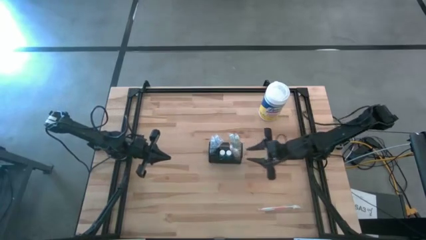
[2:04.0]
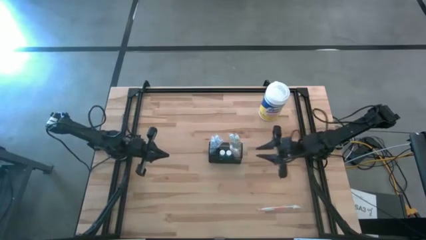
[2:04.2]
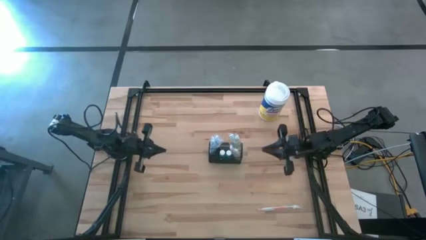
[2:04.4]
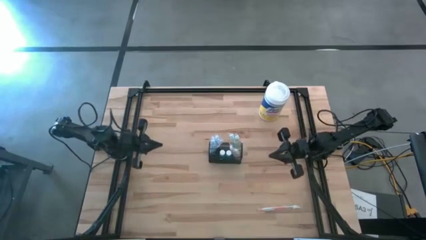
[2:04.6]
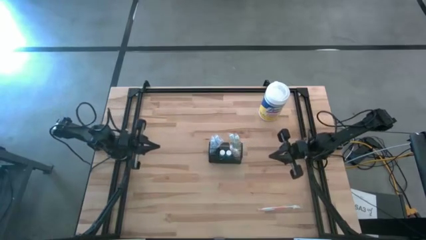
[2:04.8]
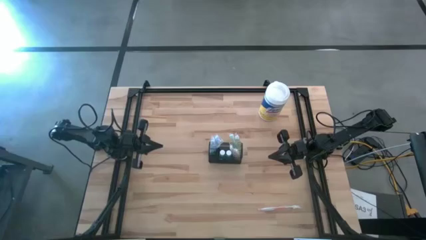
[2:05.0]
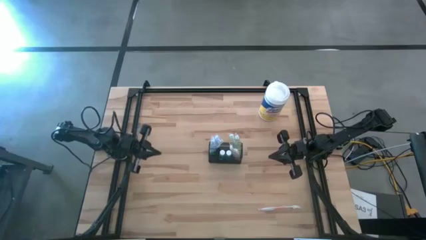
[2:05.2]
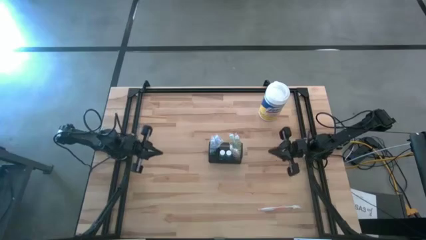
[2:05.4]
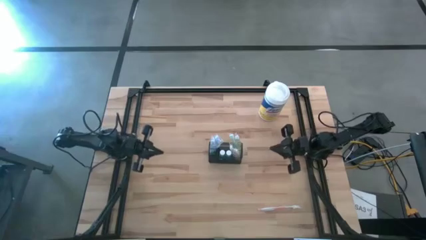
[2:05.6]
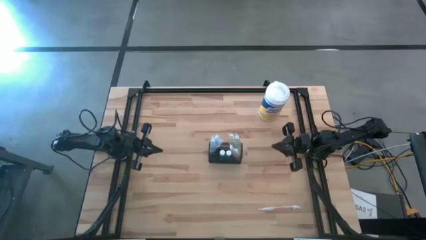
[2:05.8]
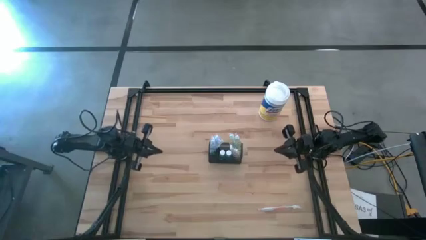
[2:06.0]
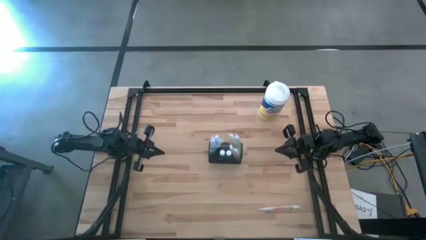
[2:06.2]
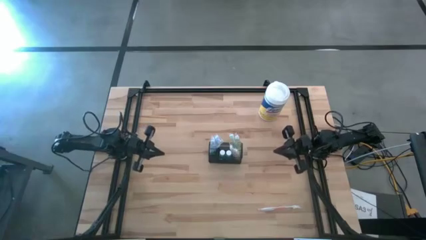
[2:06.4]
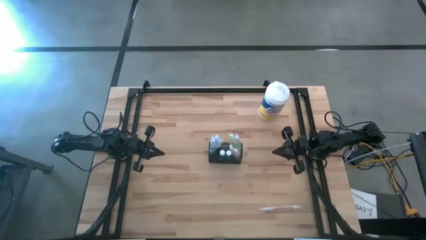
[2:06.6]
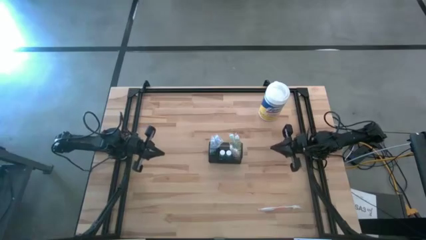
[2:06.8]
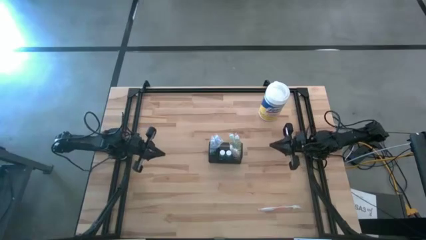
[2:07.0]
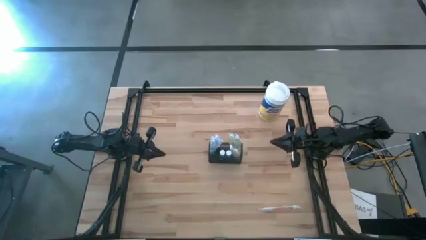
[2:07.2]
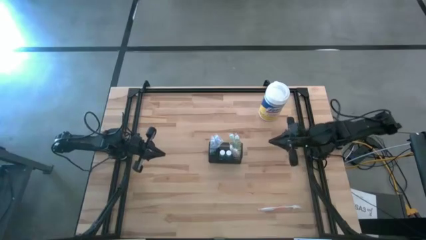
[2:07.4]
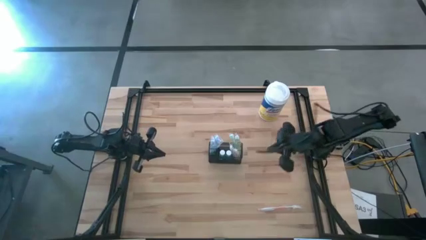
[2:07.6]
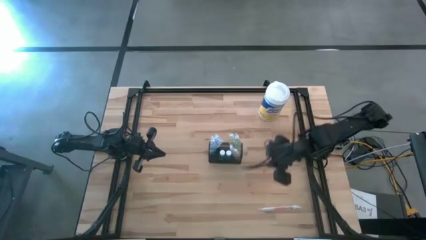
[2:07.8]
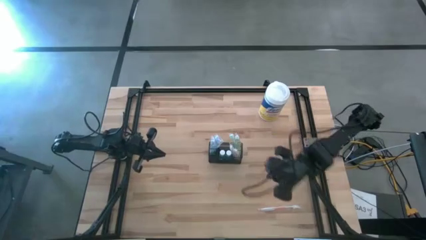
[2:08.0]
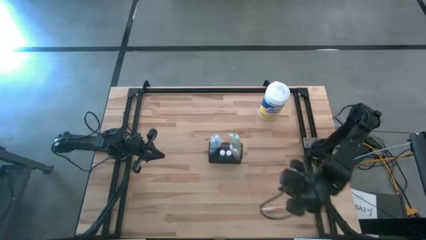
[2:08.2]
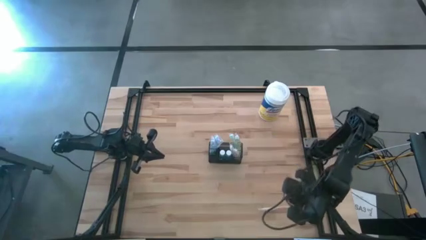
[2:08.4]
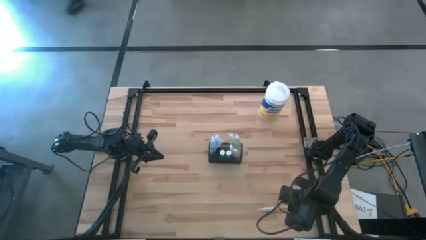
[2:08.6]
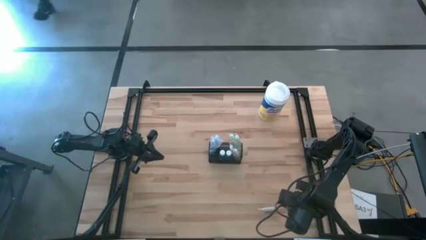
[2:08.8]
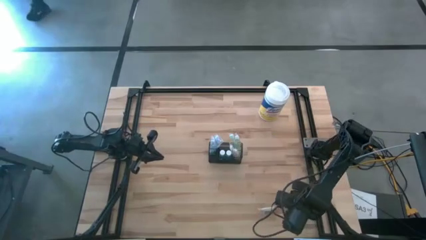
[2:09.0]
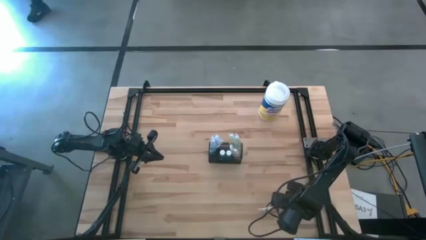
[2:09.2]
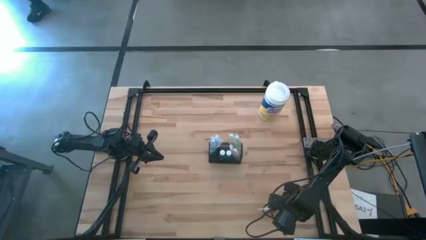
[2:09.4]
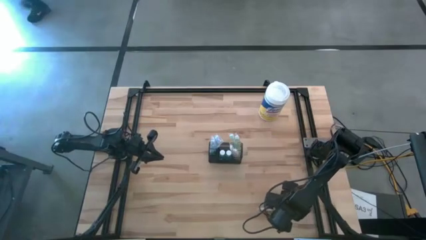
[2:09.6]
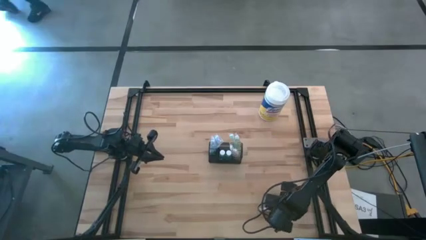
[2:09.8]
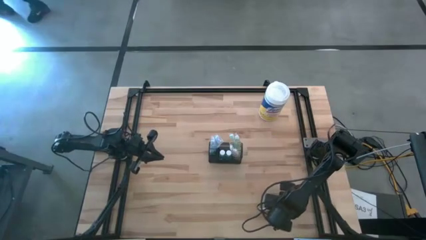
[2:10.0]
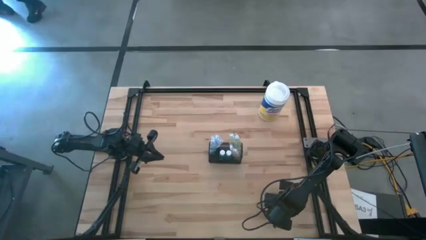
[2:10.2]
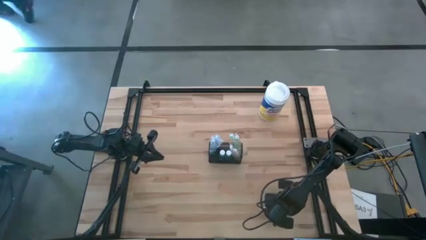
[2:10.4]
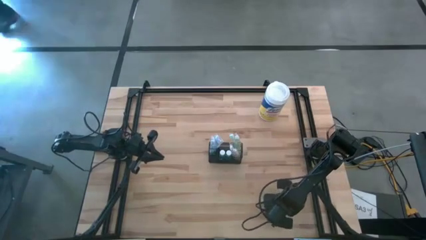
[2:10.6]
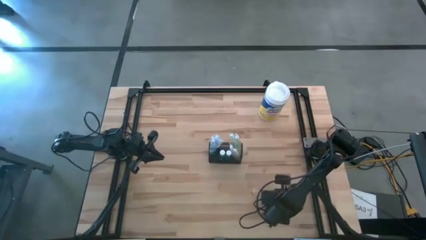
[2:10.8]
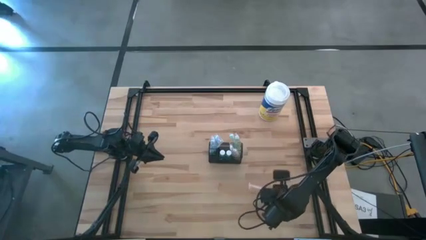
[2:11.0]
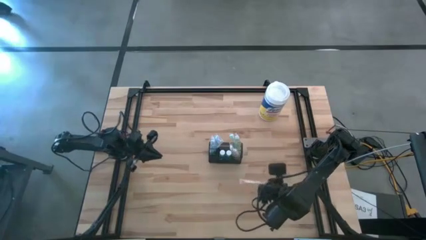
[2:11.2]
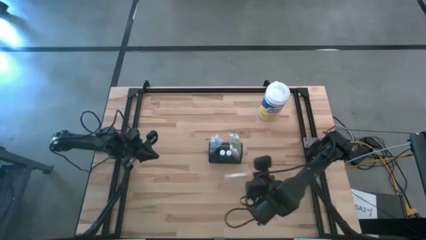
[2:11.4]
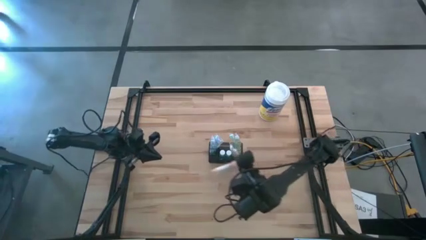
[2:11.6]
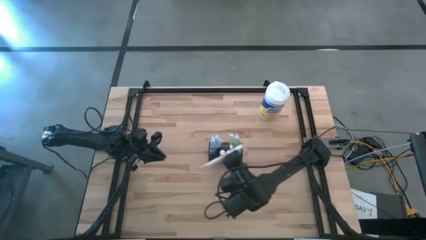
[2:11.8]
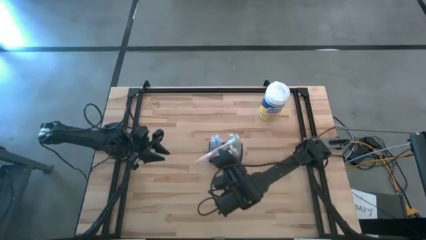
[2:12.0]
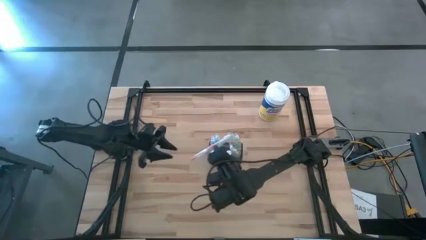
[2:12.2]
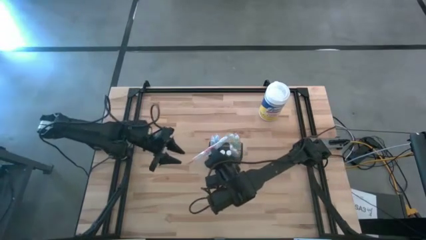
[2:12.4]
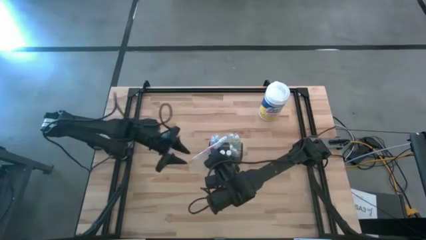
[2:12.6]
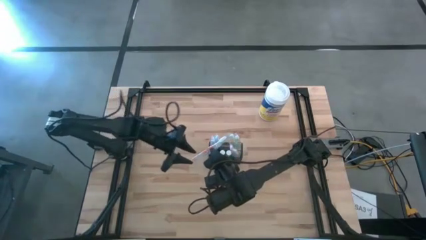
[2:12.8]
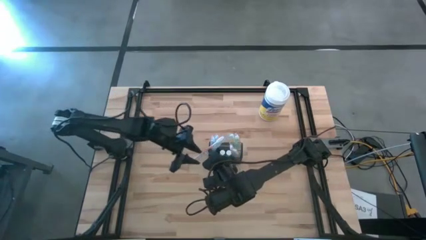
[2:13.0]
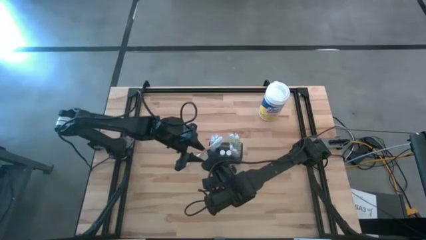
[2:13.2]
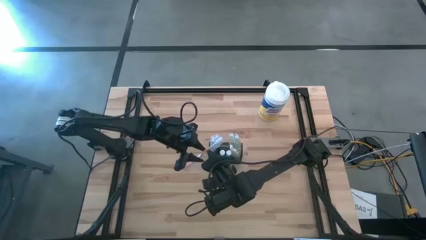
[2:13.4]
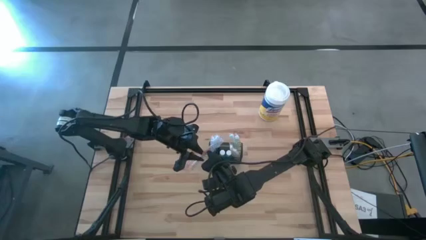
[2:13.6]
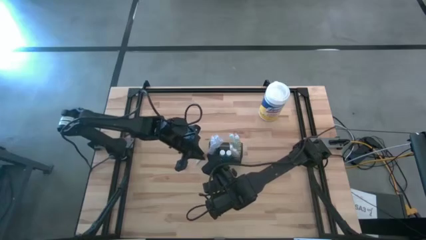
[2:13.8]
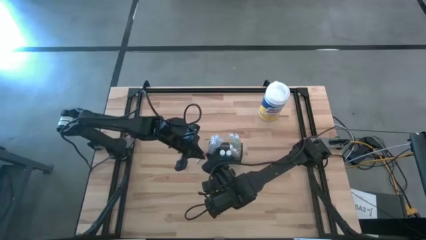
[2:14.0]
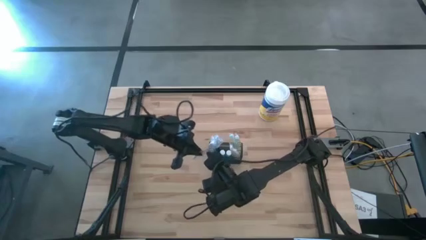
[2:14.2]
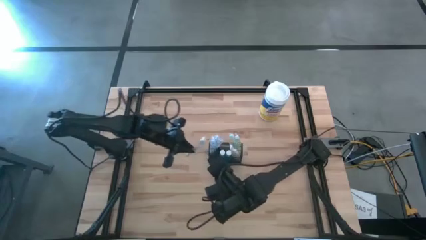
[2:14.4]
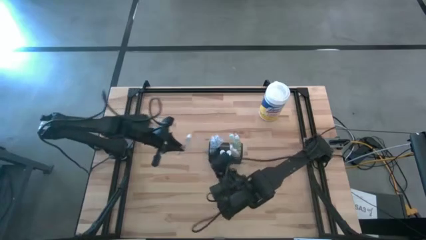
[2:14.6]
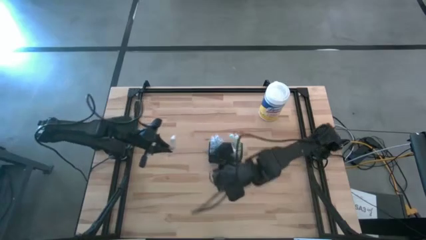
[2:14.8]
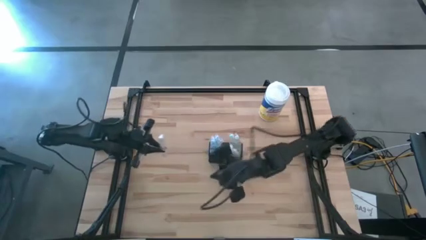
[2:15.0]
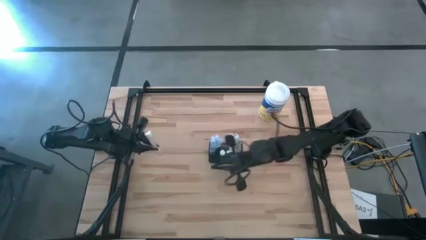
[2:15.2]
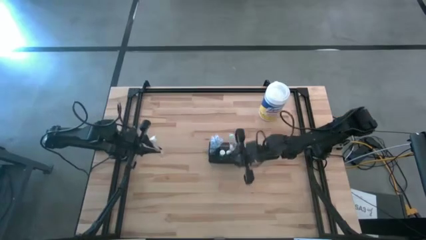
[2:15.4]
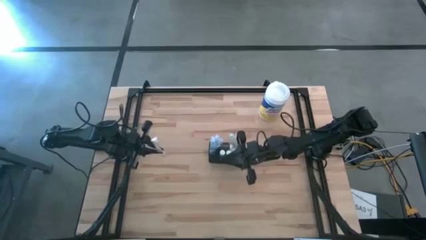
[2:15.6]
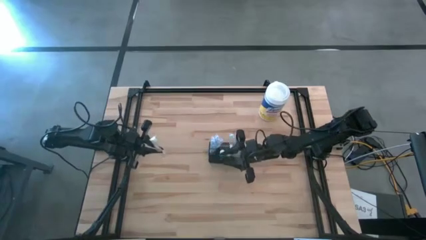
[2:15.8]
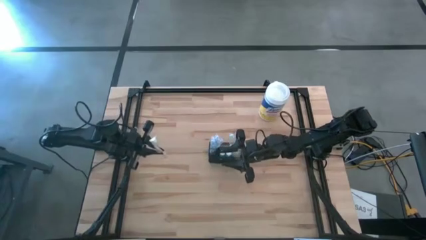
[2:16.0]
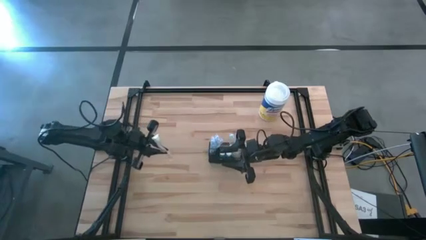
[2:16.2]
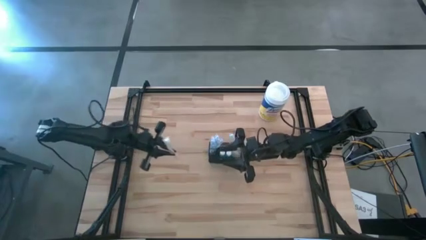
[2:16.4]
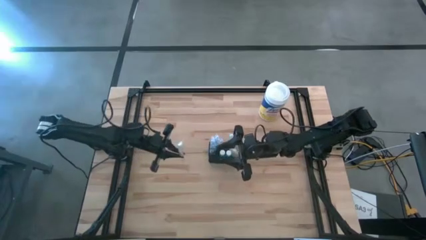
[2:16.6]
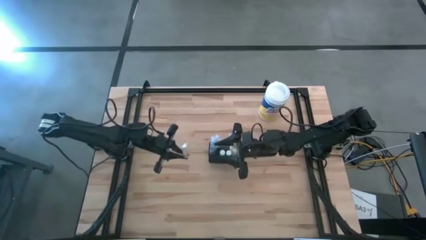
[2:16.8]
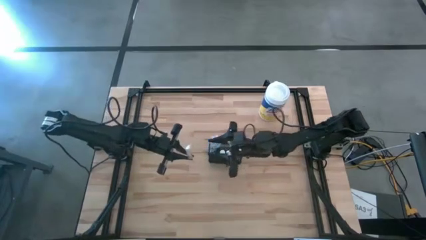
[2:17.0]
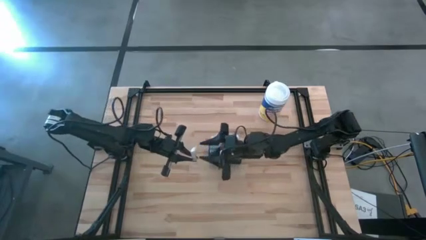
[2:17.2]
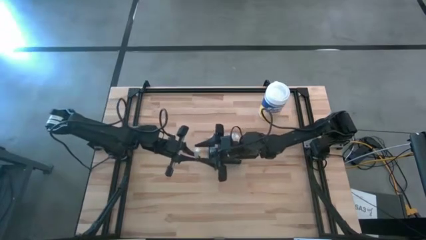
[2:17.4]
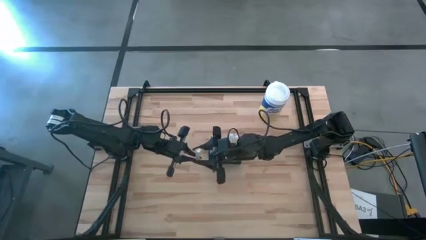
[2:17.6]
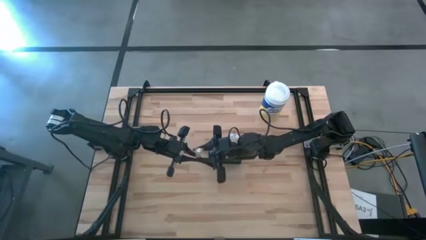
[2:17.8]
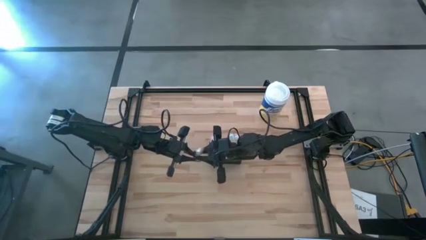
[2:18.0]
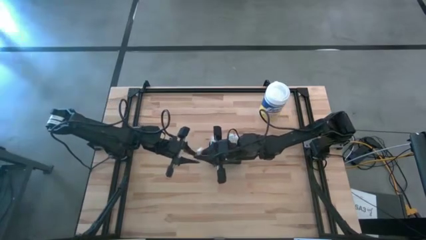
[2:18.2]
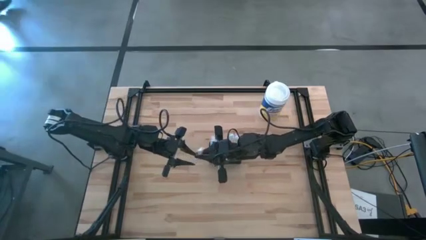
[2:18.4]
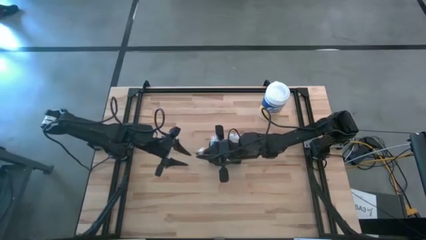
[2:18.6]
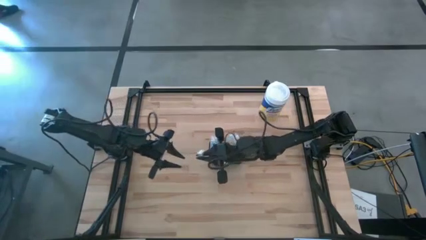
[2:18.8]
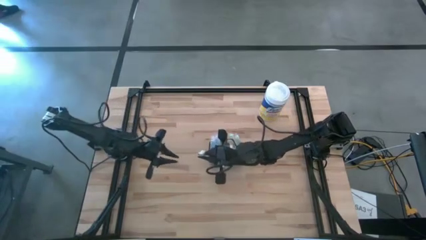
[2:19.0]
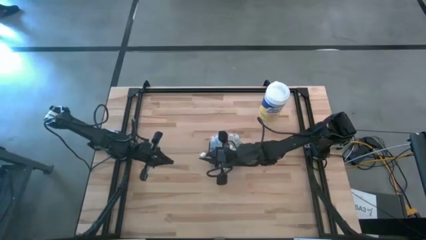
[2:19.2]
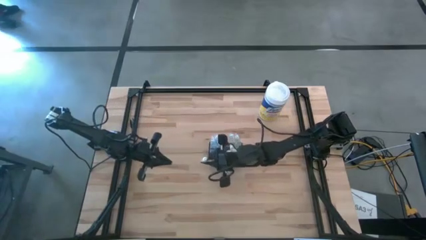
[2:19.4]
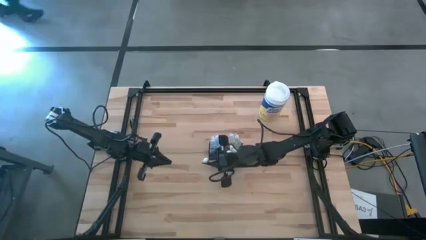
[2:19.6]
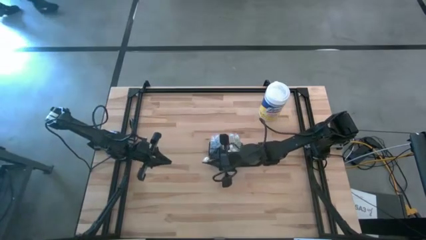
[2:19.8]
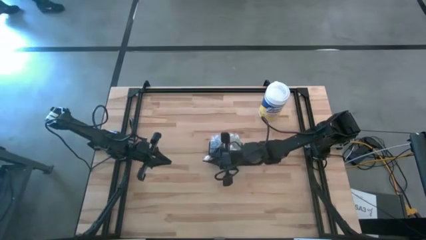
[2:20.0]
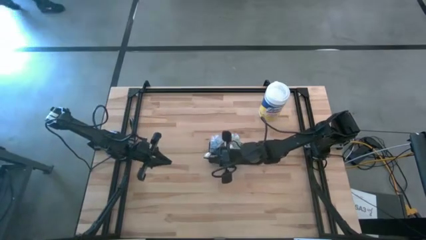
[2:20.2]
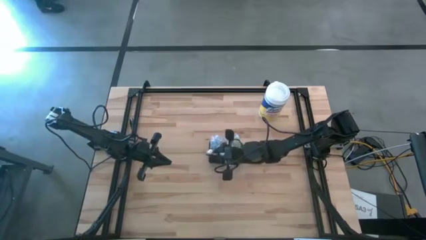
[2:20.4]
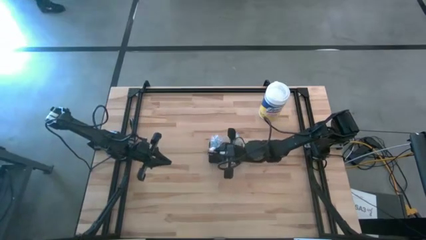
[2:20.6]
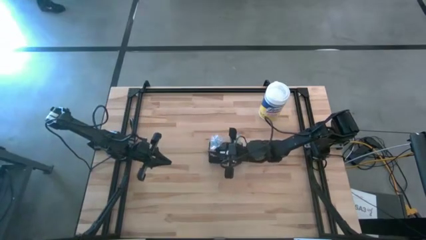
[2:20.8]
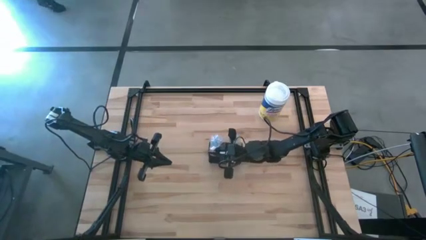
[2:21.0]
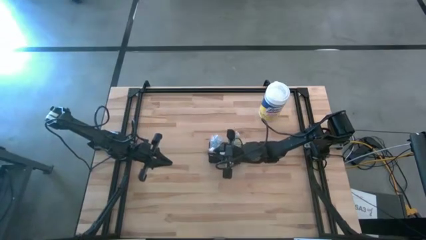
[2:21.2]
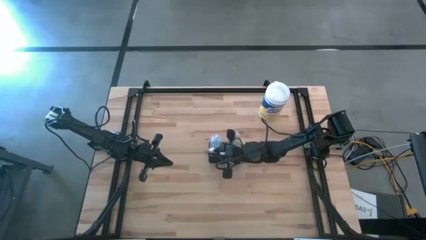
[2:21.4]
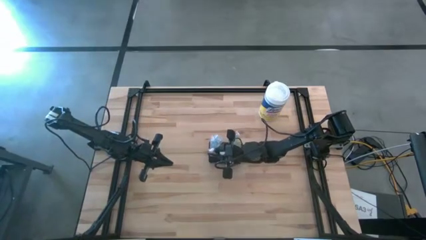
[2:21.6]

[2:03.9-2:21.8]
Task: Pick & Place toothbrushing station
Put the orange toothbrush into the wire organizer
